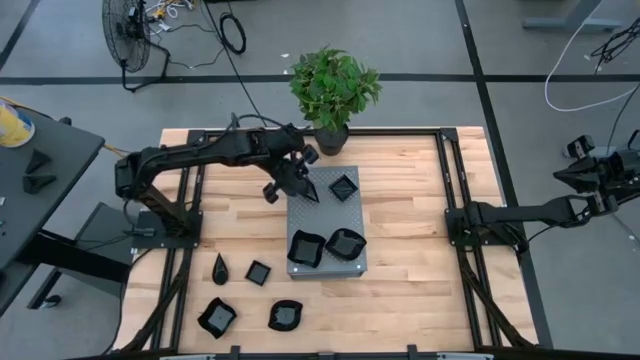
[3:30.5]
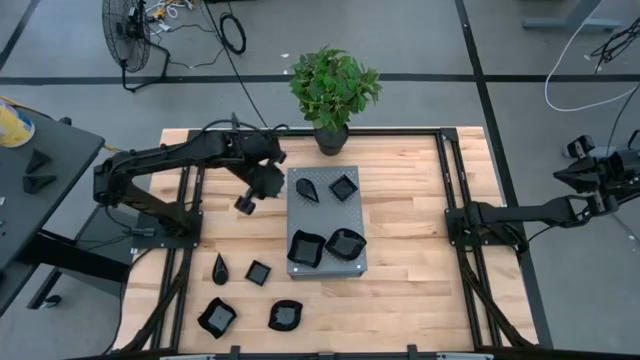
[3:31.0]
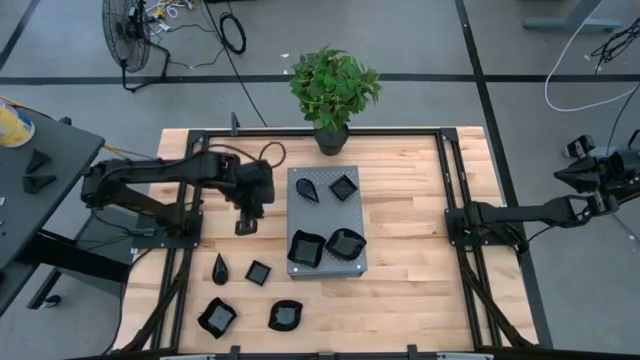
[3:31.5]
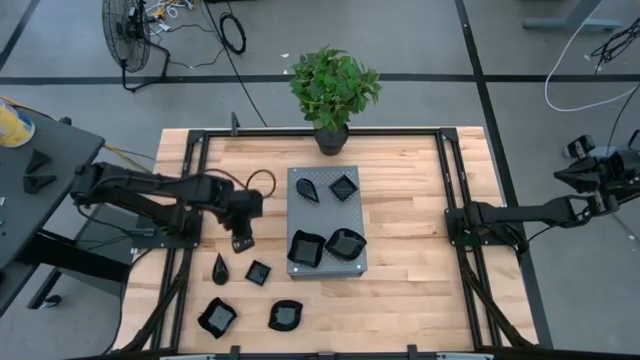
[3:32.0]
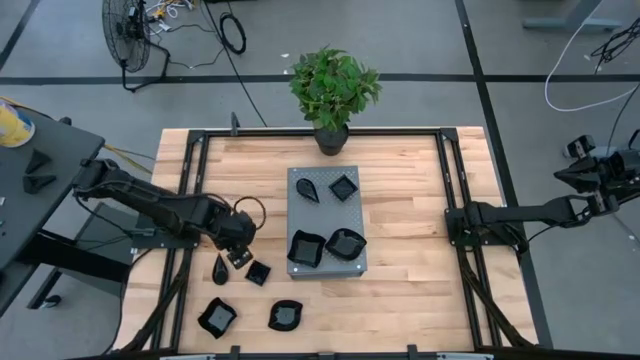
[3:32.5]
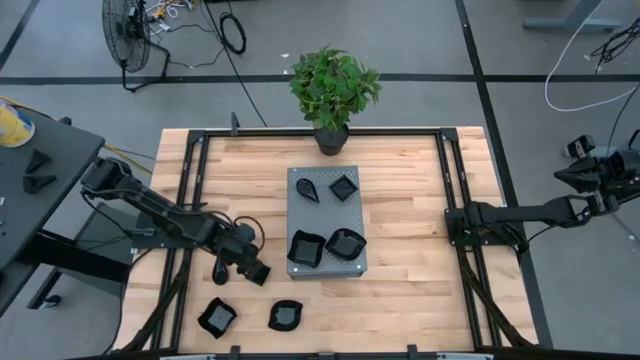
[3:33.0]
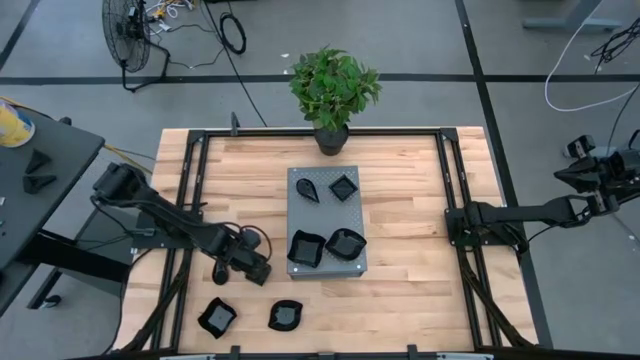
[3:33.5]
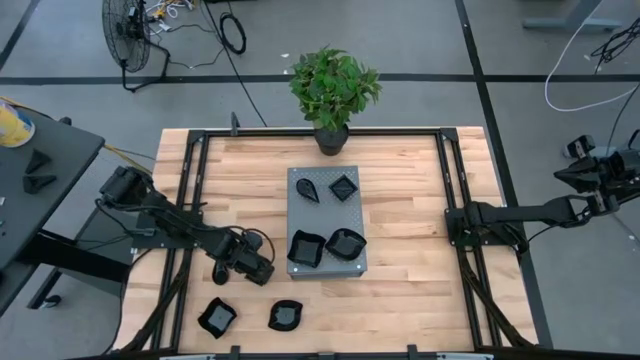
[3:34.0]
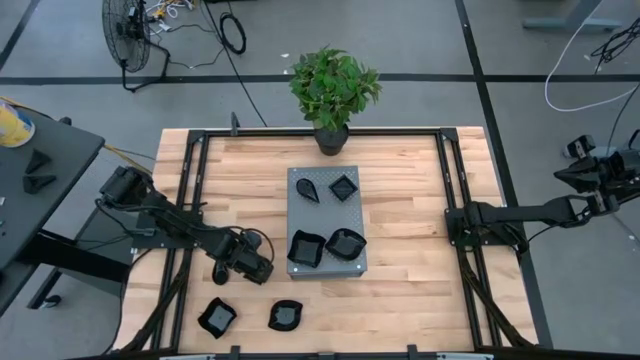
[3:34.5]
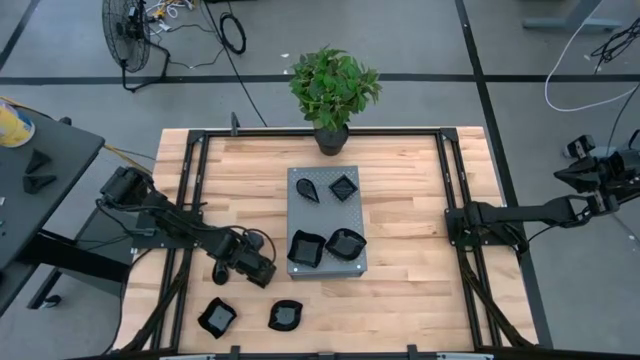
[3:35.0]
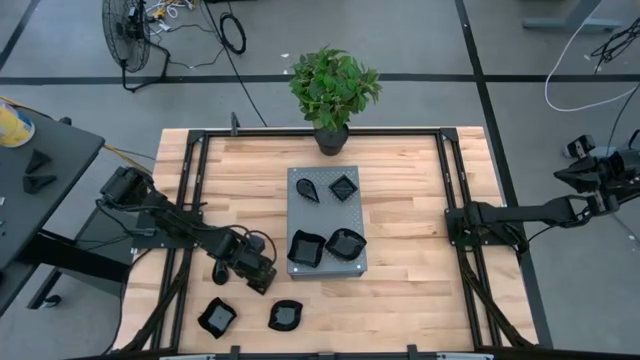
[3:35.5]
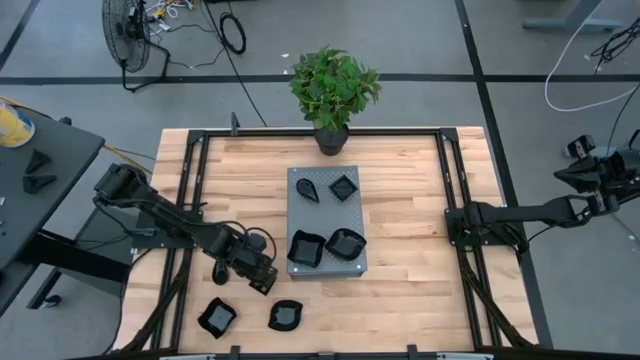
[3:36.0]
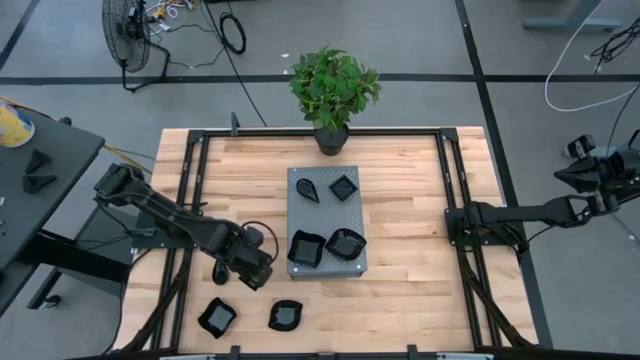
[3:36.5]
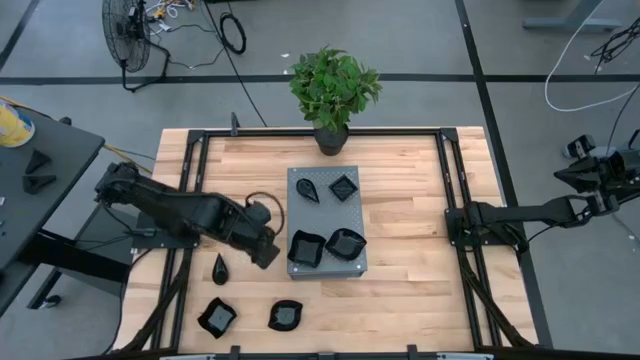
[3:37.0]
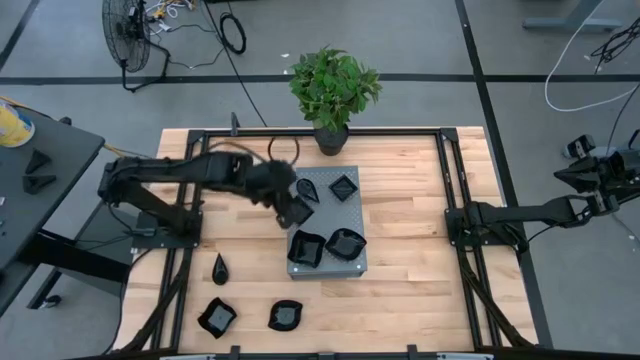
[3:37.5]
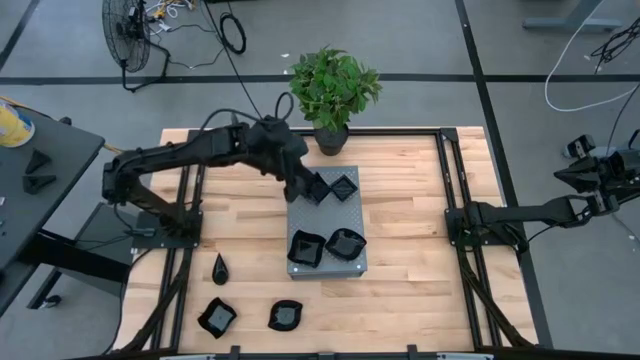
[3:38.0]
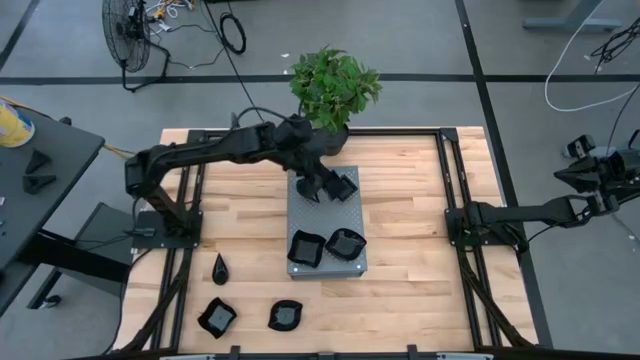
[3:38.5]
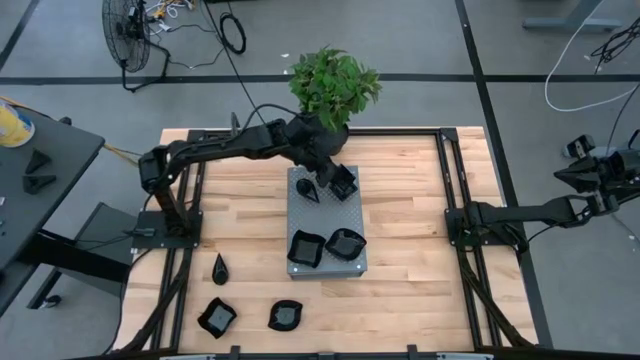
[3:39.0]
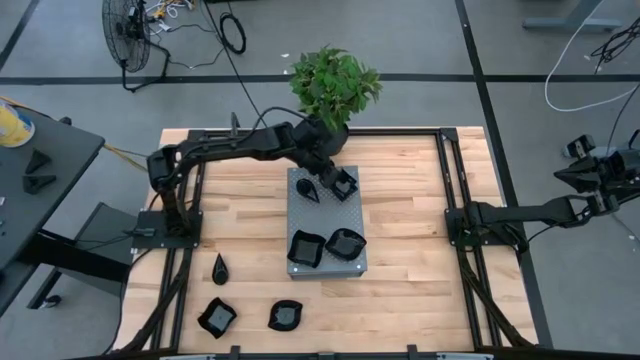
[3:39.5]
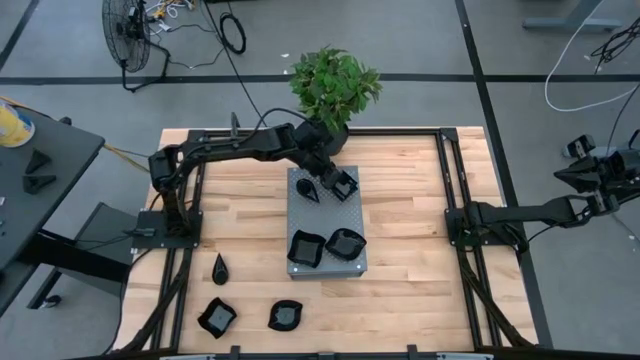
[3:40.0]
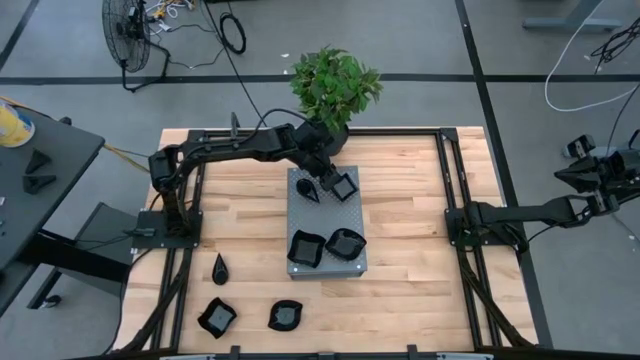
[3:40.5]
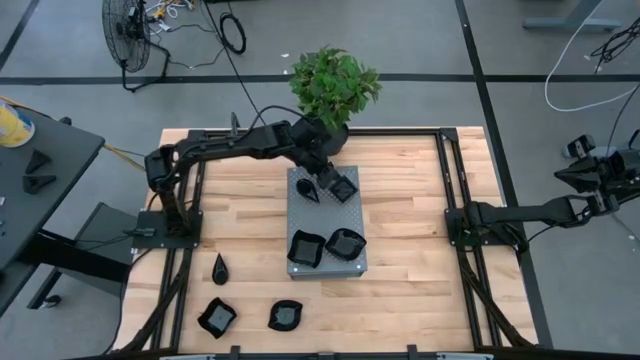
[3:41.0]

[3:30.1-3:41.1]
Task: Pick & Place Mini shaped plates
Stack the black bowl on top of the black bowl on the shelf

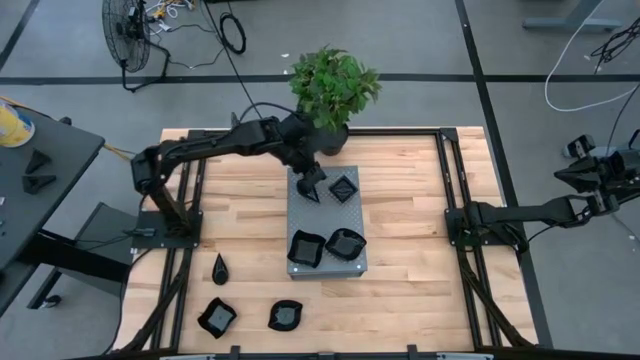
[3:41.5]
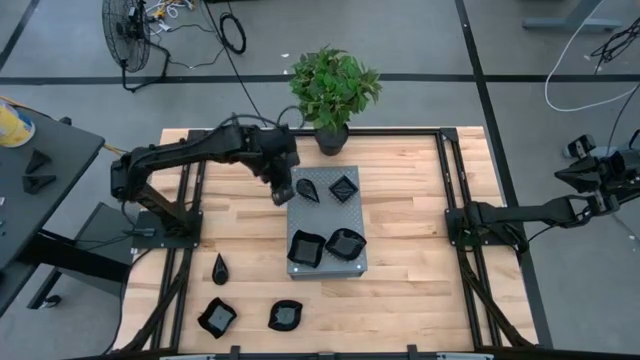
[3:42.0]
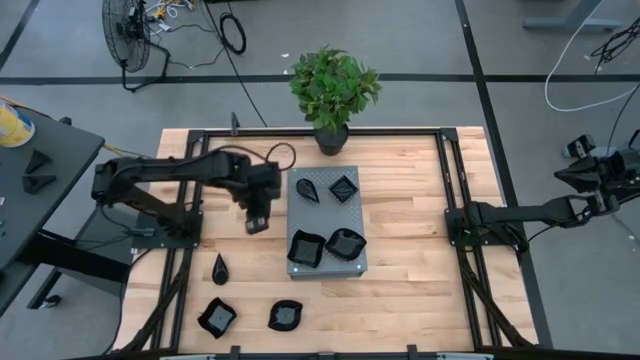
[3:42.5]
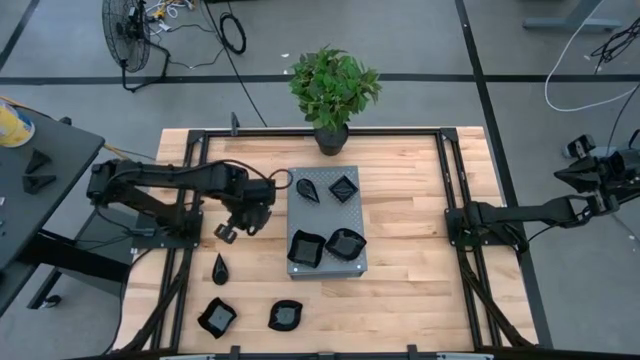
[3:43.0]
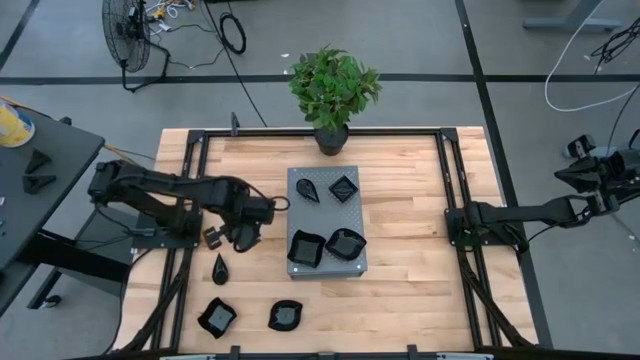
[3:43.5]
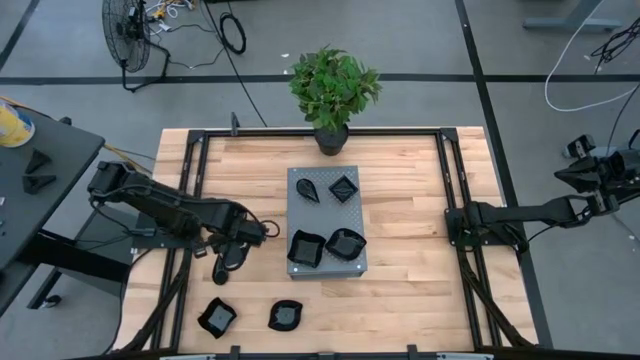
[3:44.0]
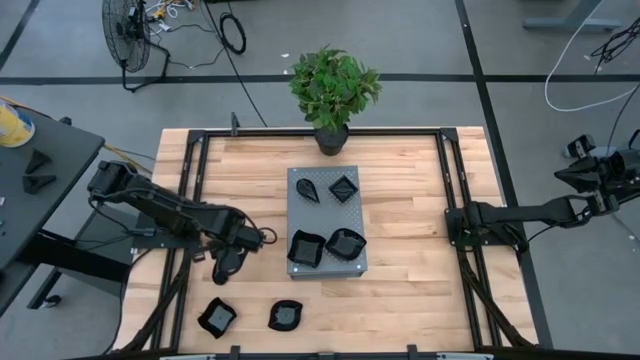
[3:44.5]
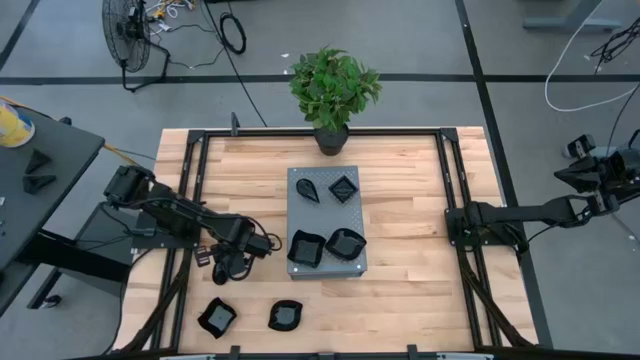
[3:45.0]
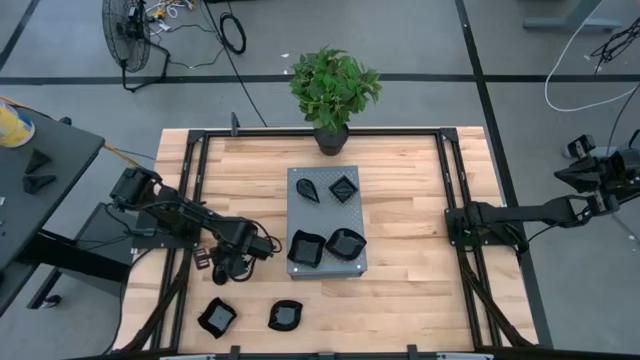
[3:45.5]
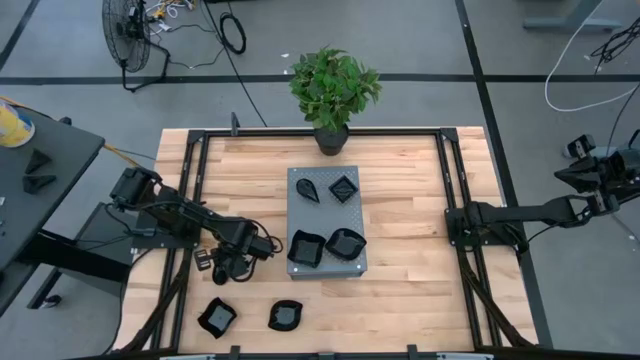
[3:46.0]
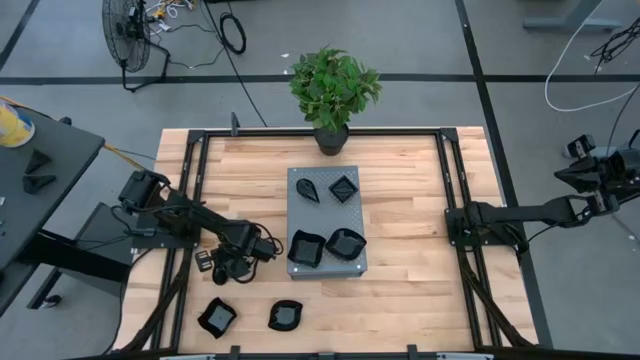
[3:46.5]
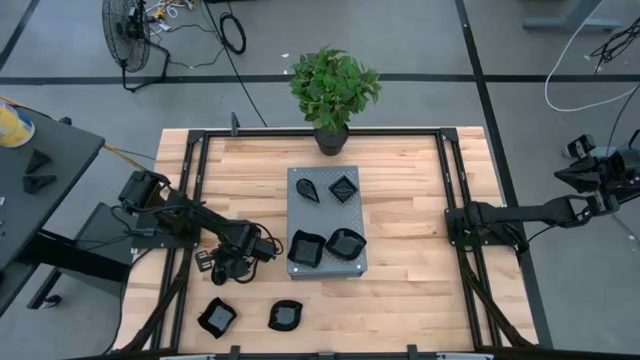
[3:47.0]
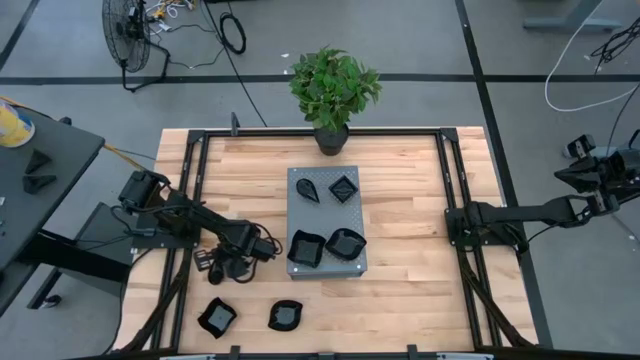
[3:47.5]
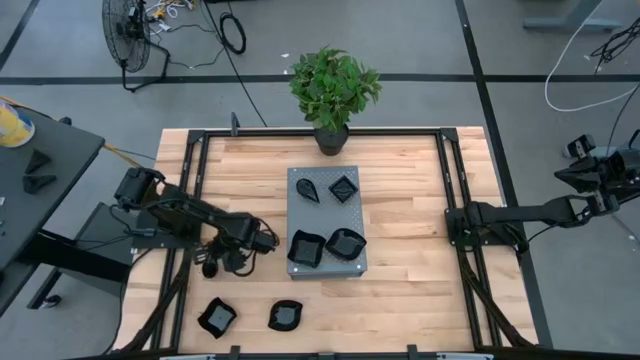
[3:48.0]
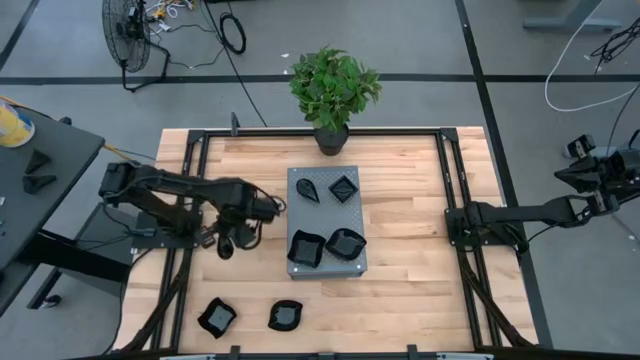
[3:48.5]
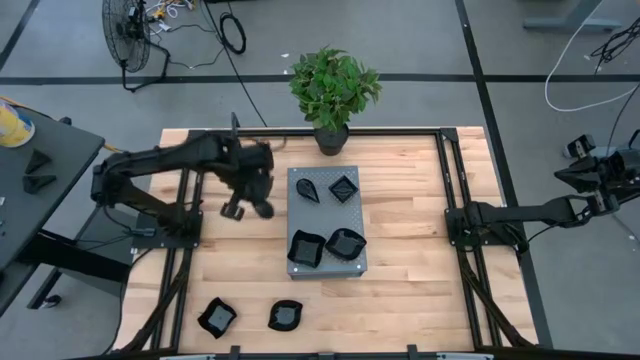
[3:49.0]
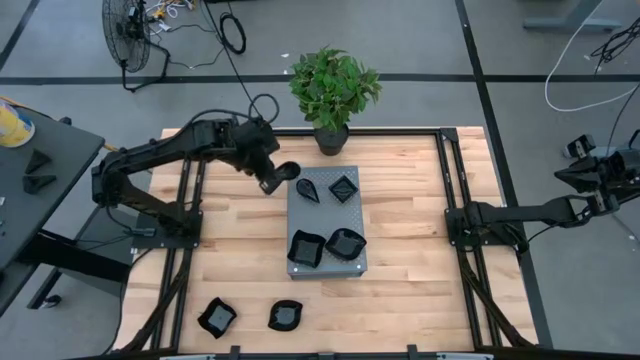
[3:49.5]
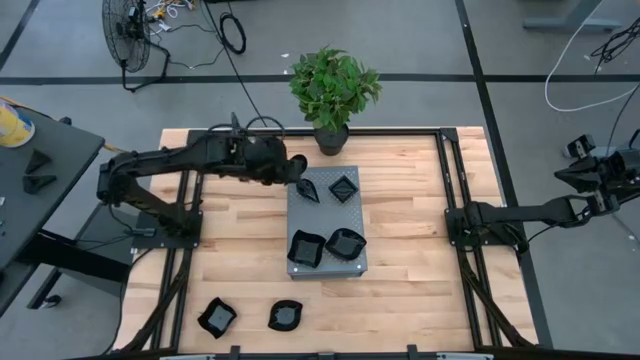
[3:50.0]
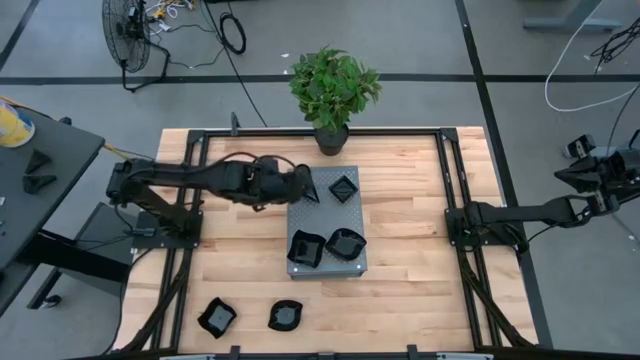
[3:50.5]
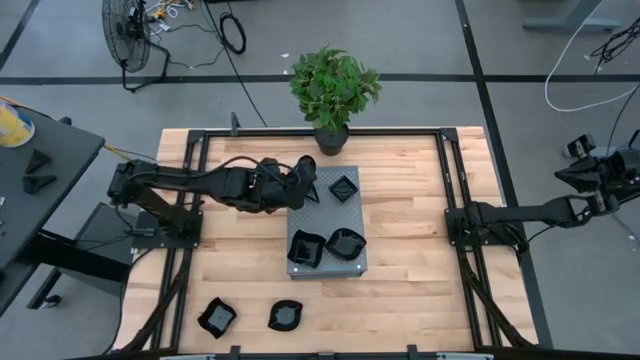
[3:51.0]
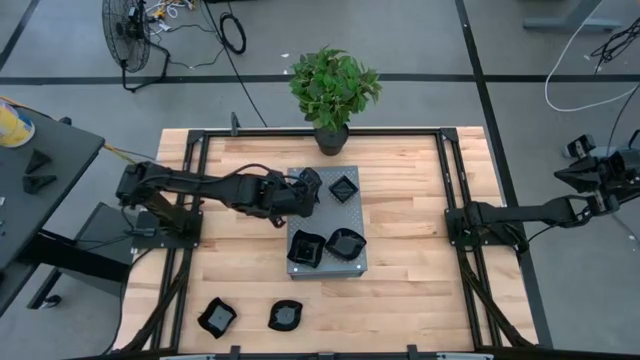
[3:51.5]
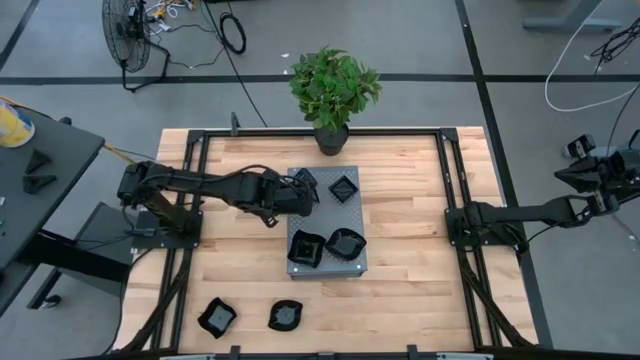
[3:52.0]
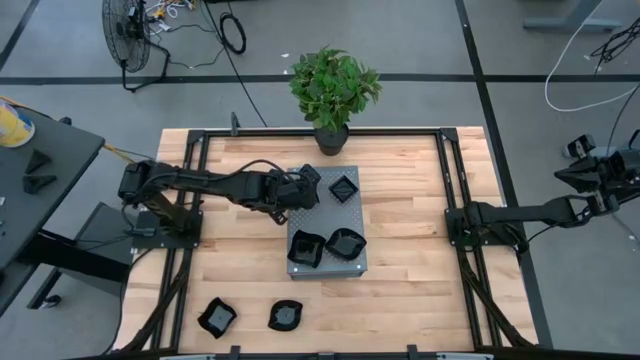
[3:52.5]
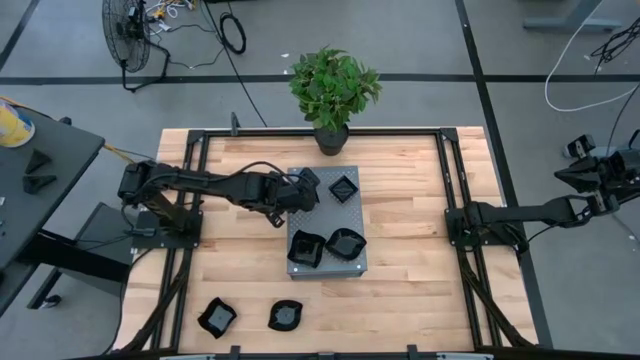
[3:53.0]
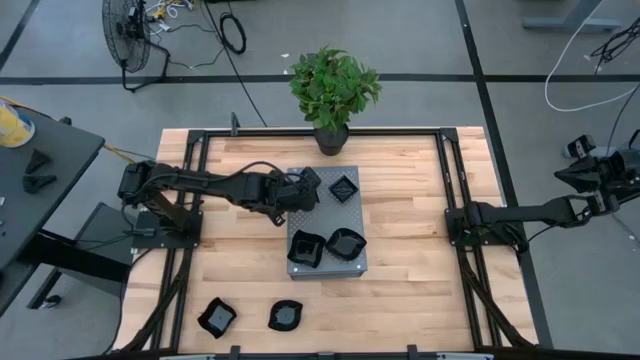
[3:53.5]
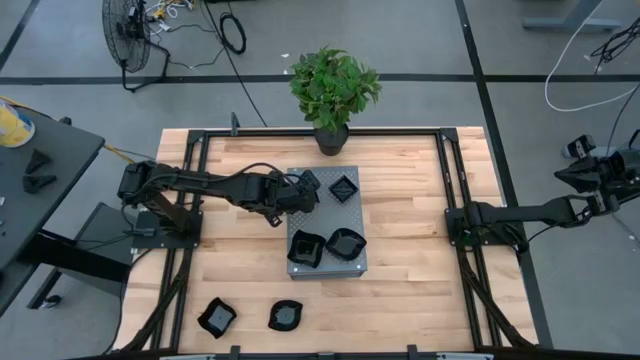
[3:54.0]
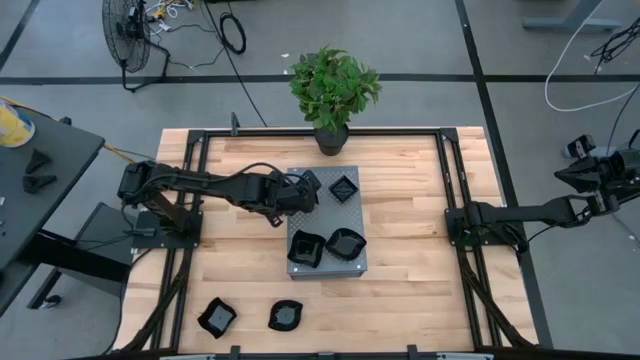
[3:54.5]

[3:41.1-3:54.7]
Stack the black bowl on top of the black bowl on the shelf
